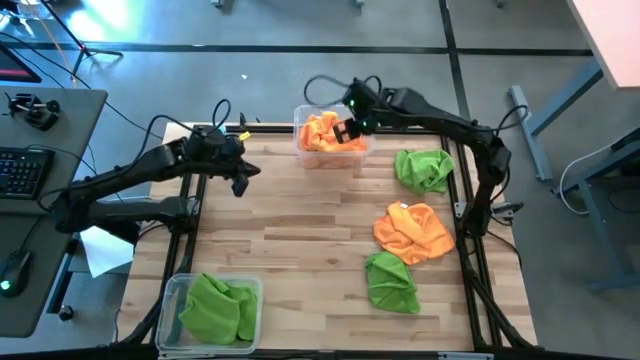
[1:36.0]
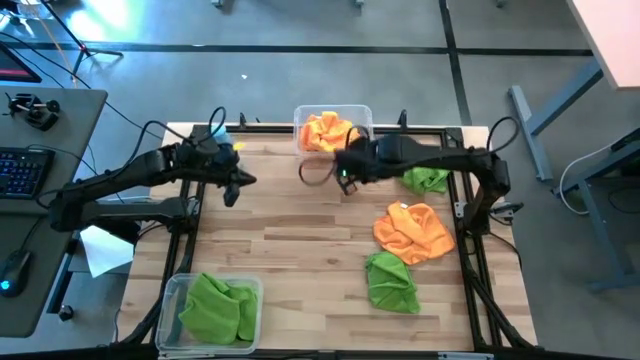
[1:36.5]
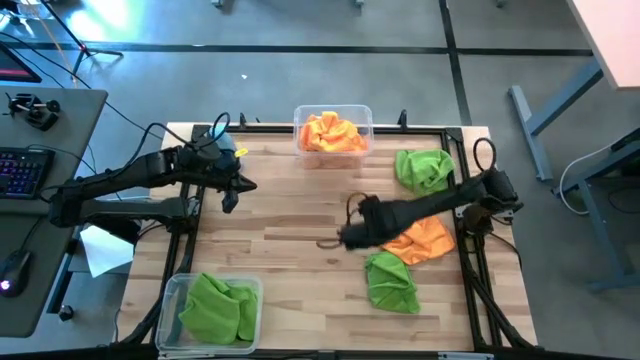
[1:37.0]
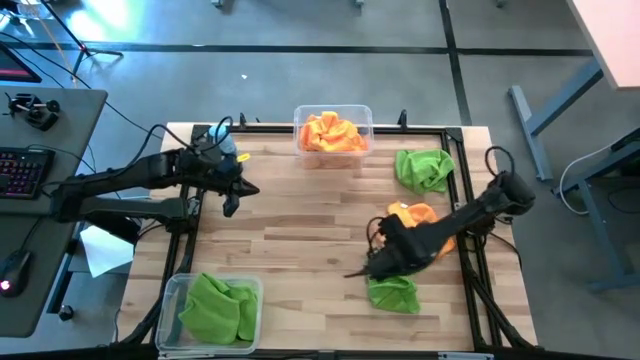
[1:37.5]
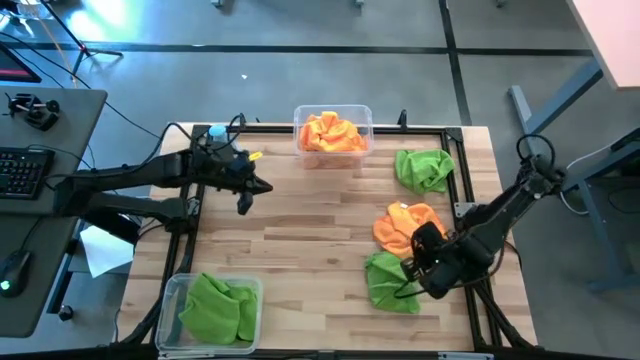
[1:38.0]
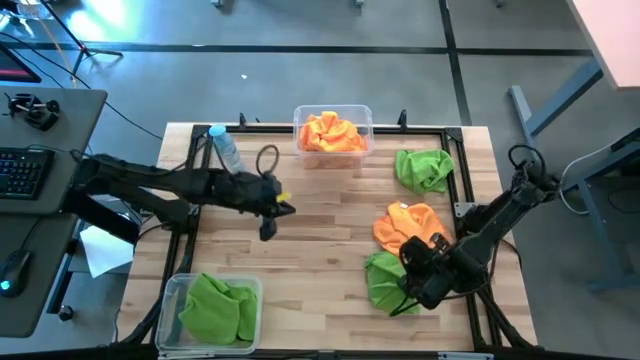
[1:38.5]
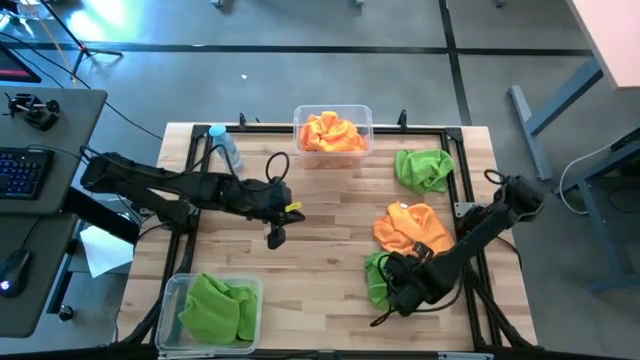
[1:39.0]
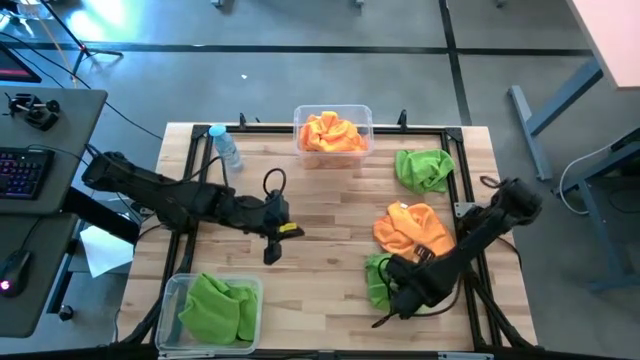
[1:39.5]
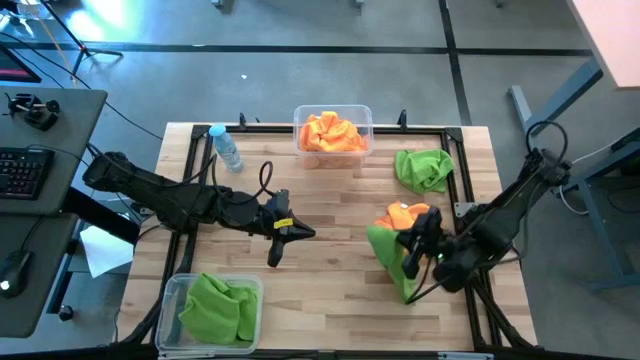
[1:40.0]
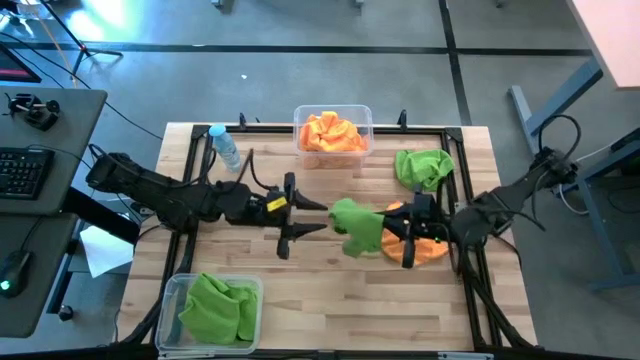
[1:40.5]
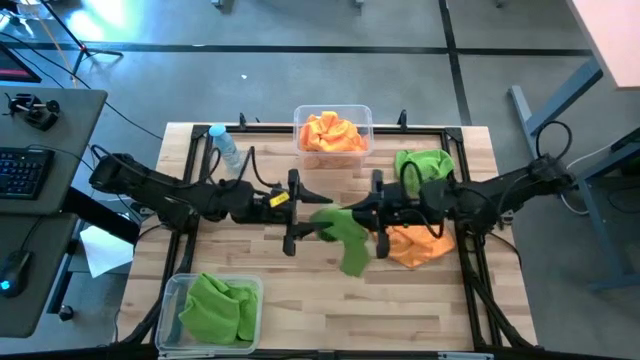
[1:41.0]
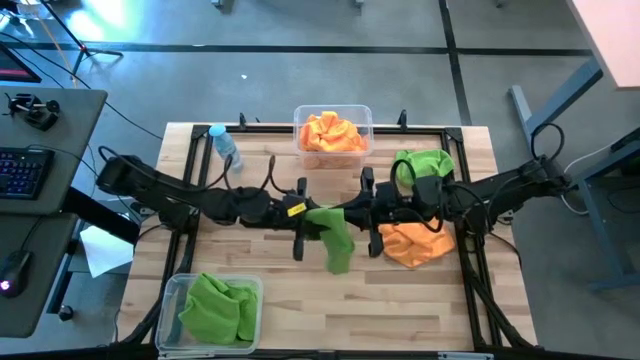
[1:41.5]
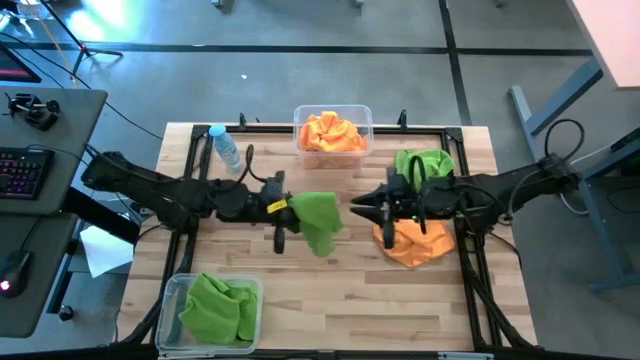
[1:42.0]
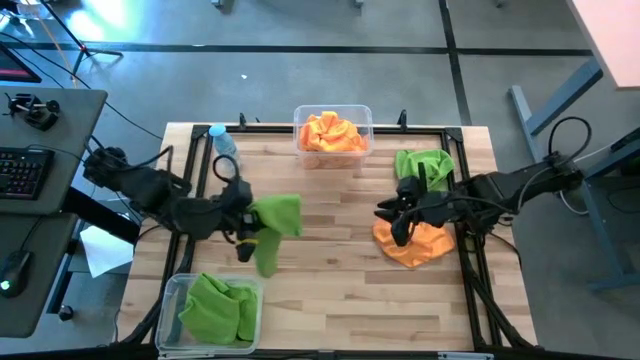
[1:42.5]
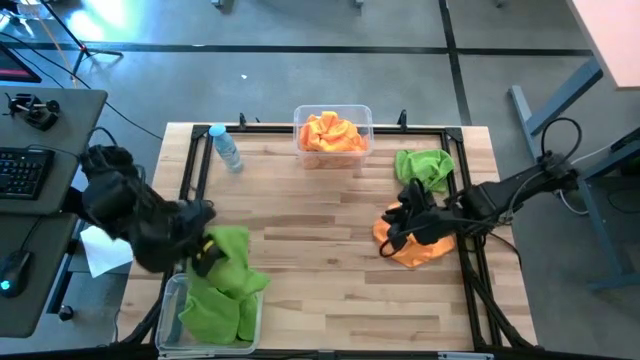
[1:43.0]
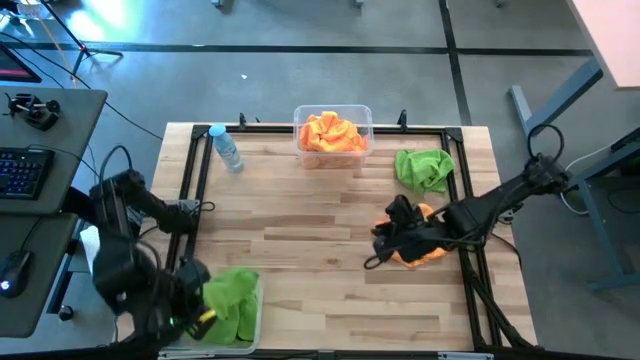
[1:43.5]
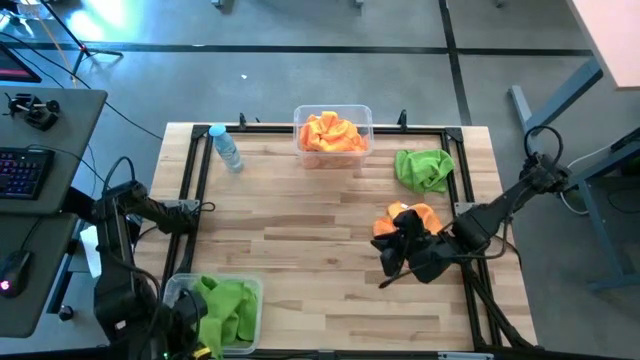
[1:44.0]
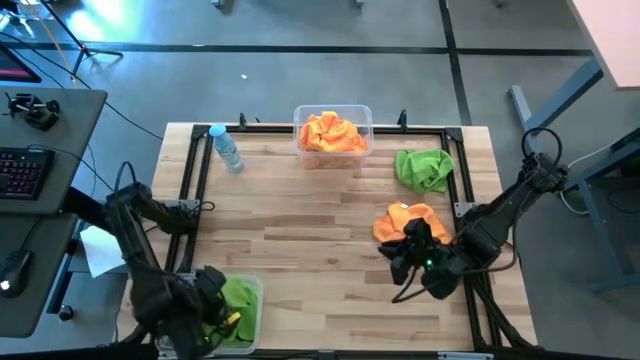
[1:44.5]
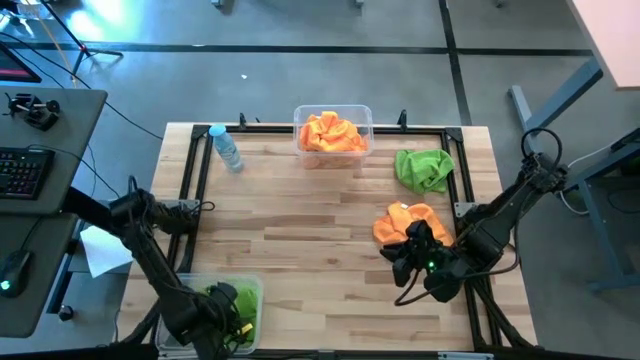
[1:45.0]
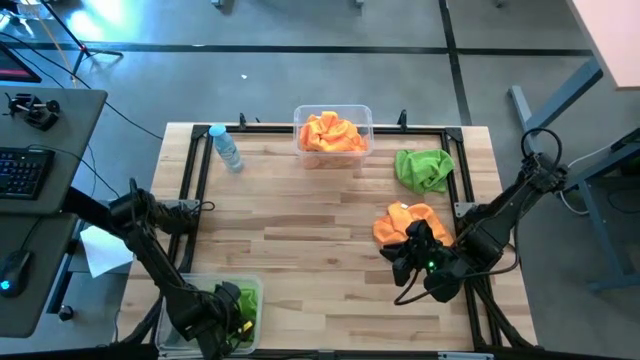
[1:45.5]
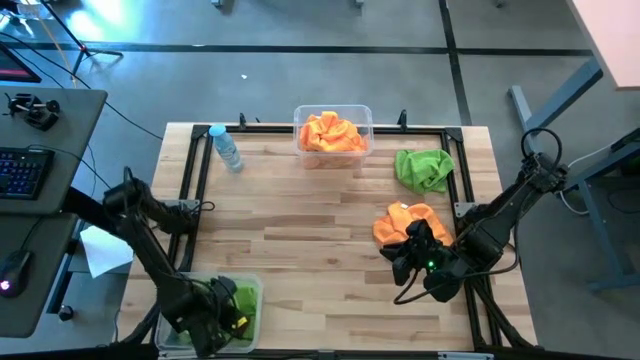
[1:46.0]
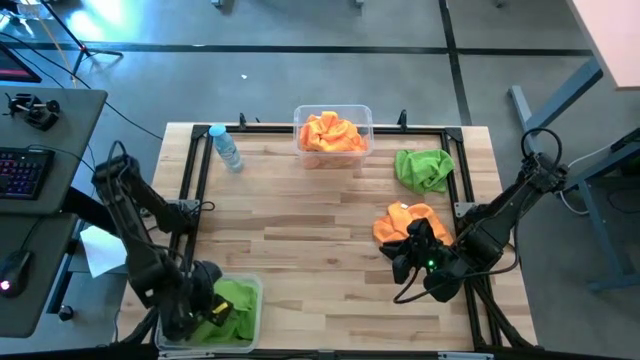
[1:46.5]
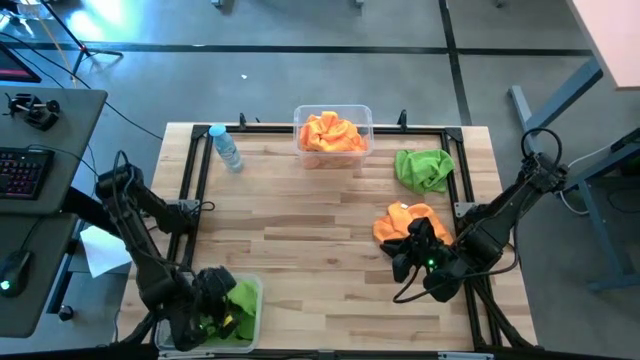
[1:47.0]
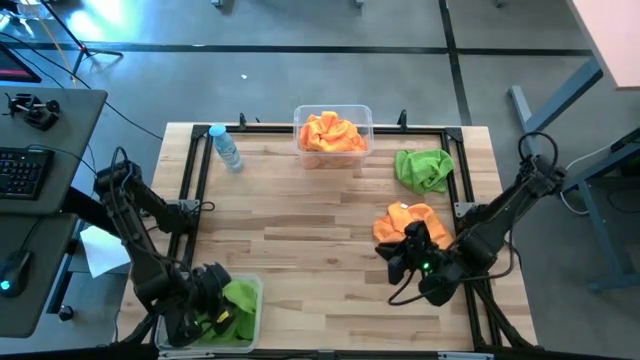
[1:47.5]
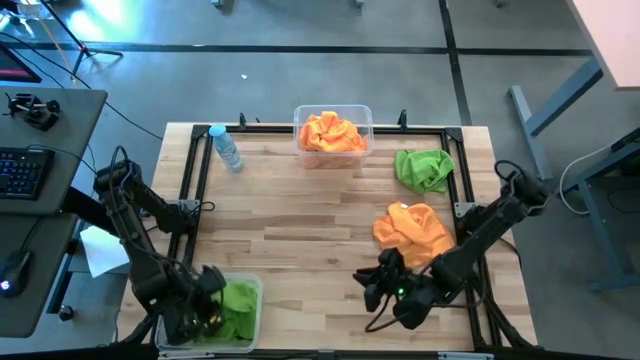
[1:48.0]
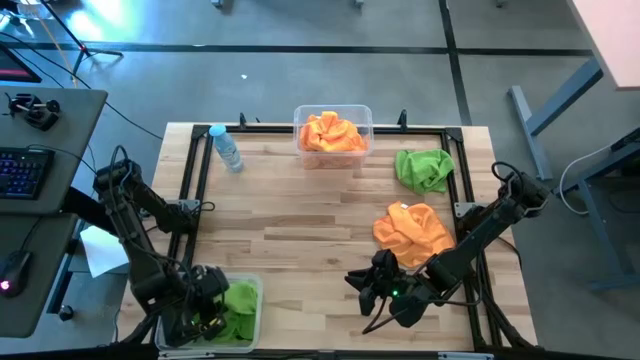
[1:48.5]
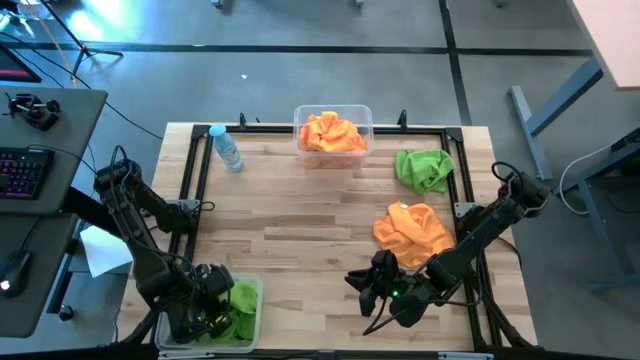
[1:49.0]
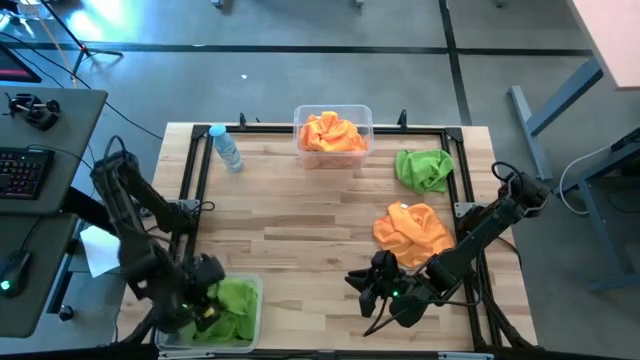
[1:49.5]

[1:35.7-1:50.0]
Task: Sort microfiber towel by color & place in baskets
Put the green towel into the bottom transparent bin

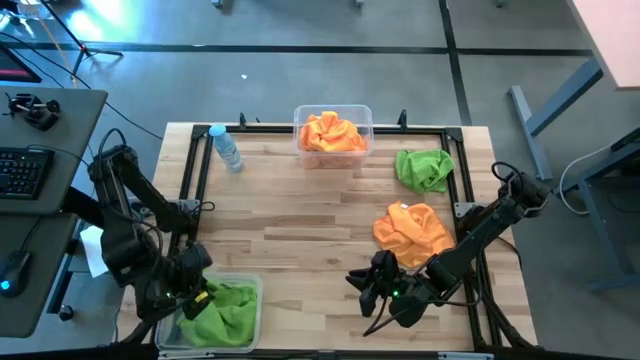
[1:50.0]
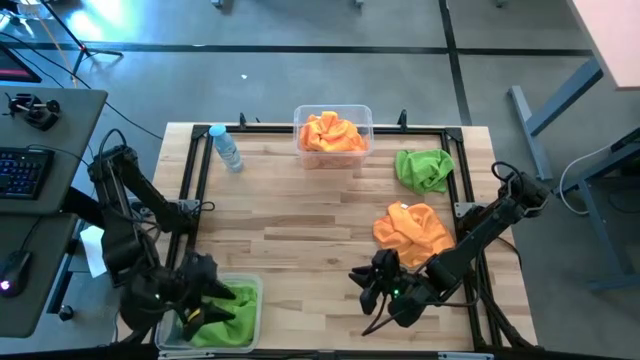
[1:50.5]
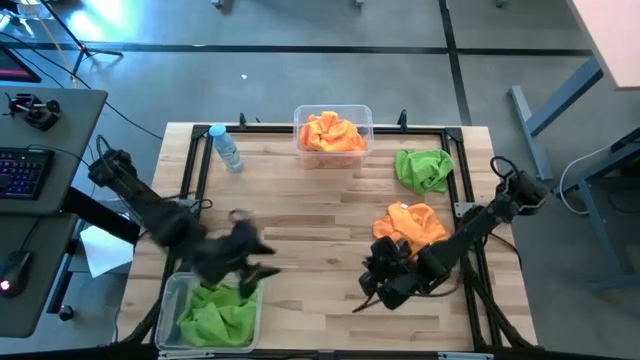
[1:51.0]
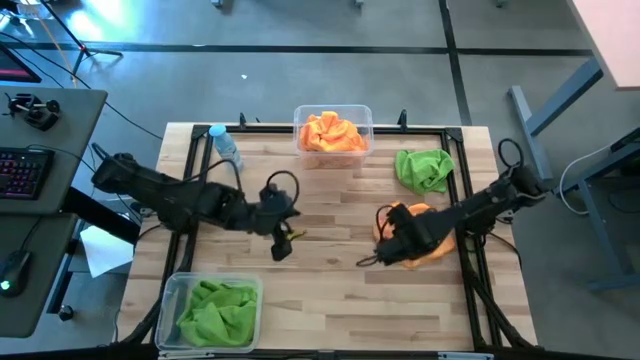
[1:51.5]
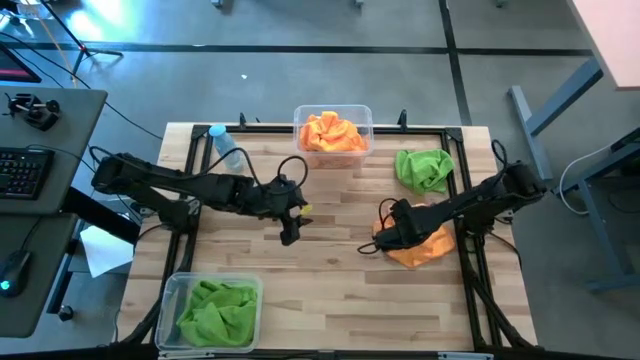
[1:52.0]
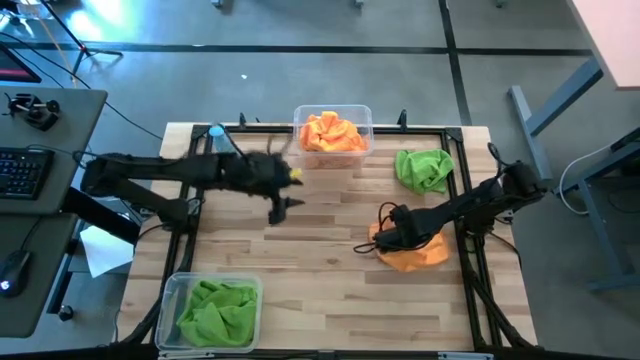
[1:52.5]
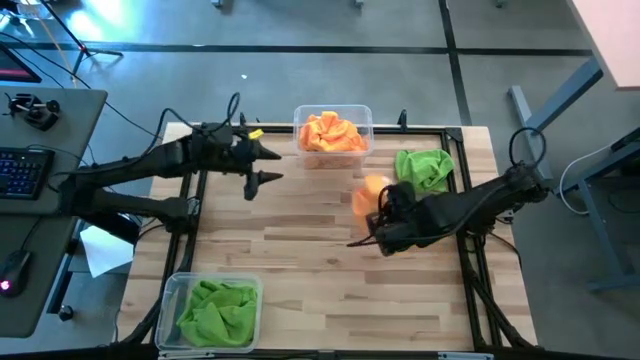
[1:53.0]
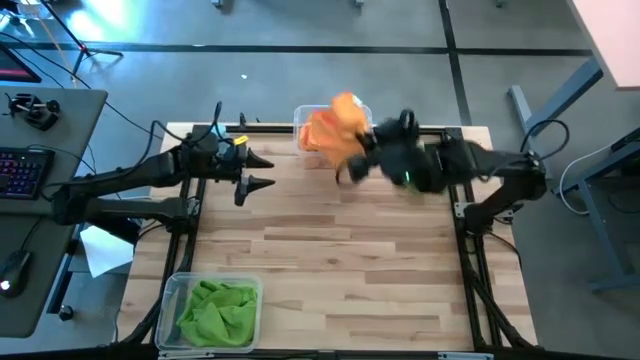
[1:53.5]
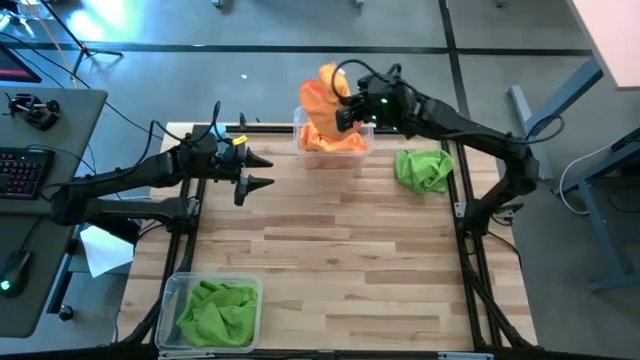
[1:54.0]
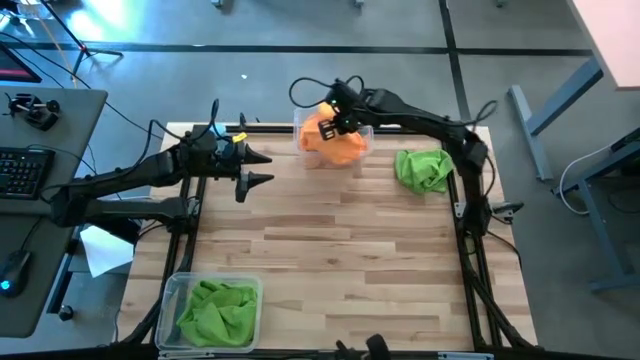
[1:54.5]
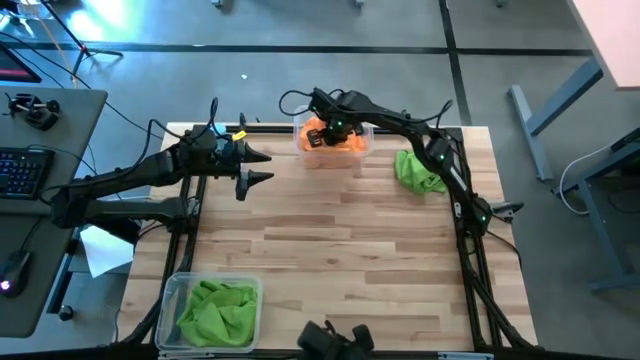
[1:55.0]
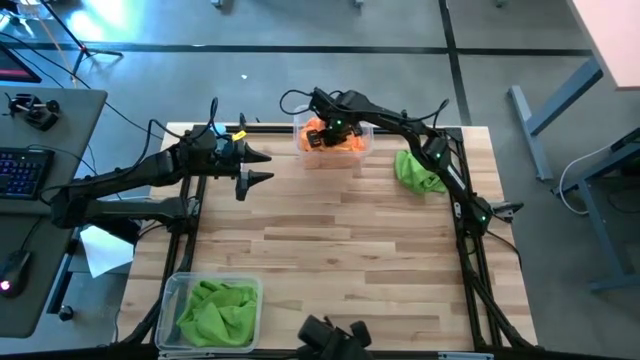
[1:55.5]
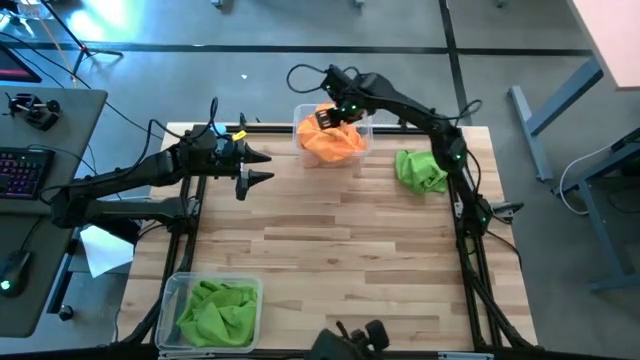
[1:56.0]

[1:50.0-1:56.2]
Put the orange towel into the top transparent bin
